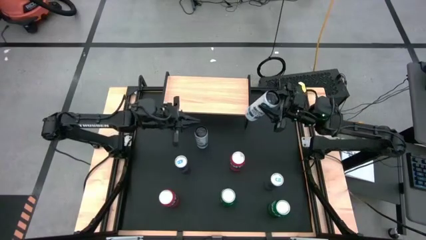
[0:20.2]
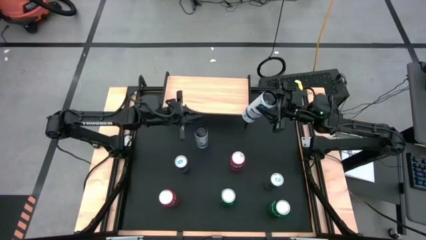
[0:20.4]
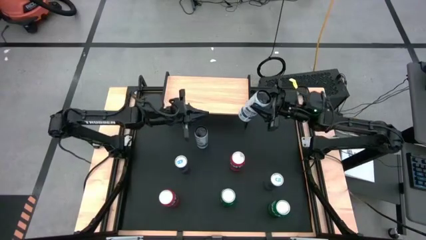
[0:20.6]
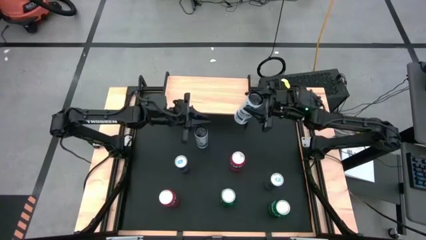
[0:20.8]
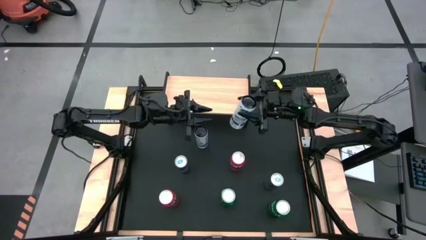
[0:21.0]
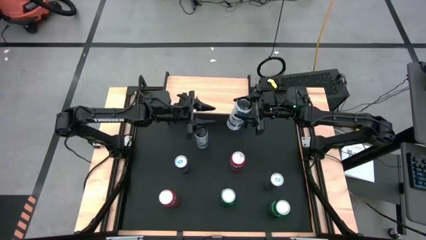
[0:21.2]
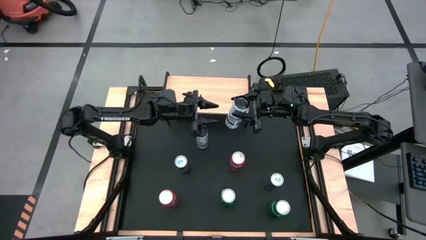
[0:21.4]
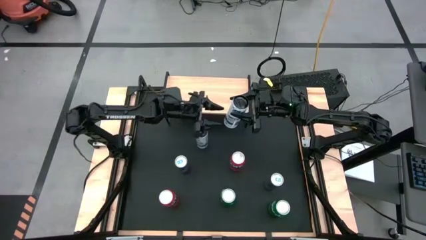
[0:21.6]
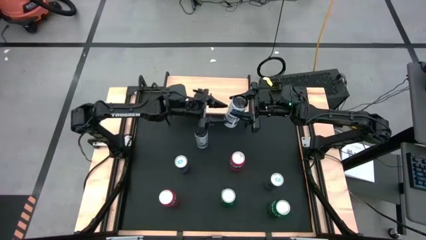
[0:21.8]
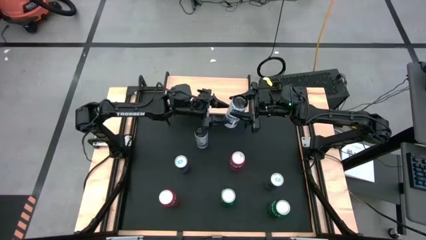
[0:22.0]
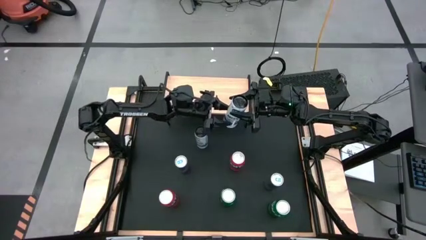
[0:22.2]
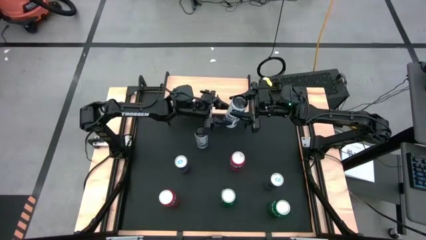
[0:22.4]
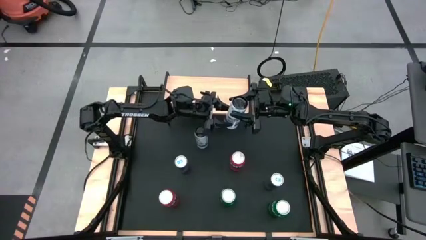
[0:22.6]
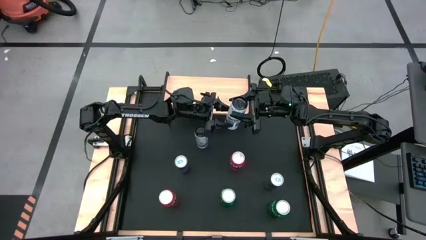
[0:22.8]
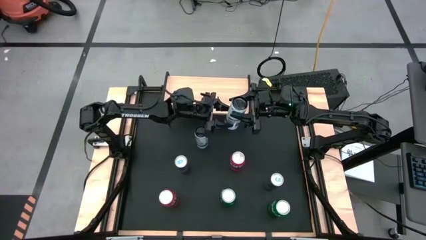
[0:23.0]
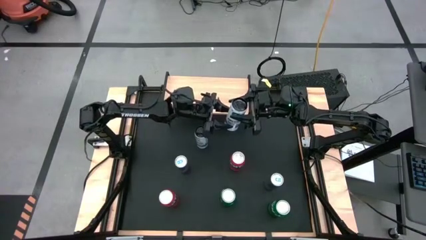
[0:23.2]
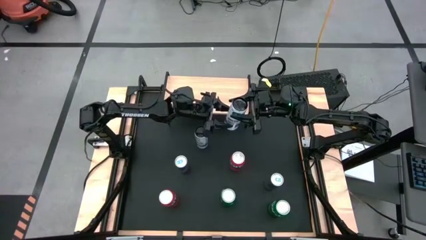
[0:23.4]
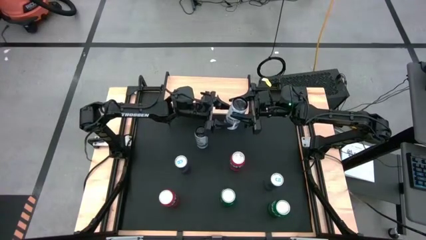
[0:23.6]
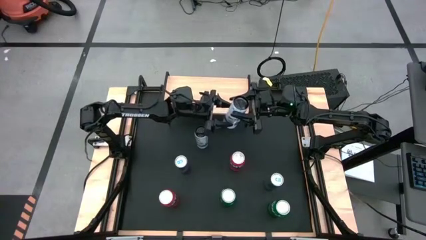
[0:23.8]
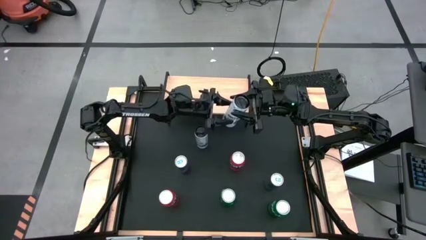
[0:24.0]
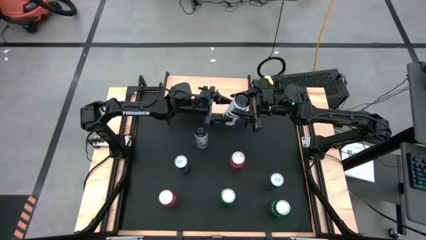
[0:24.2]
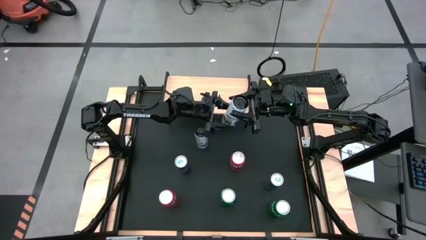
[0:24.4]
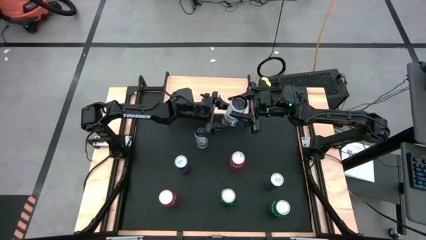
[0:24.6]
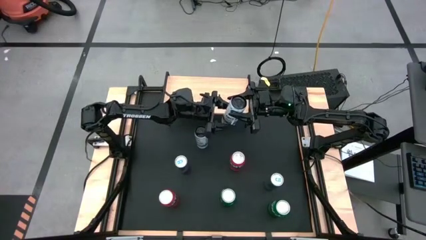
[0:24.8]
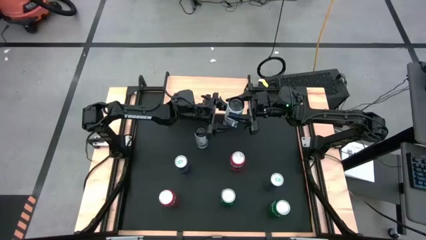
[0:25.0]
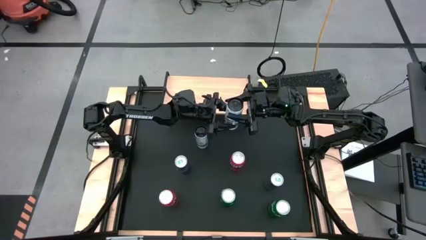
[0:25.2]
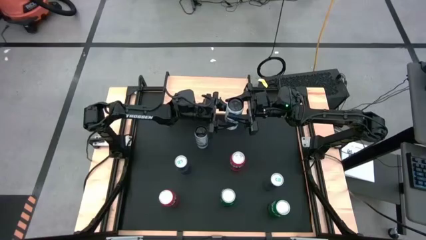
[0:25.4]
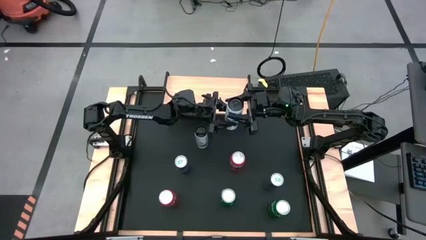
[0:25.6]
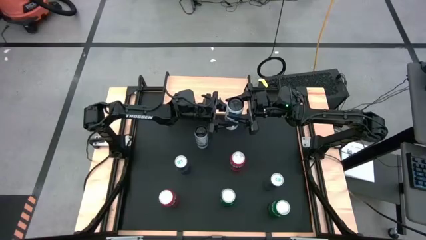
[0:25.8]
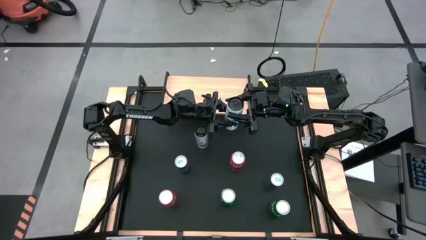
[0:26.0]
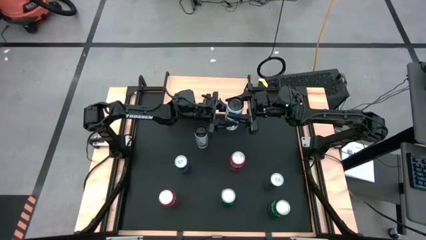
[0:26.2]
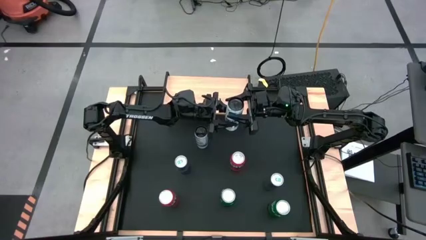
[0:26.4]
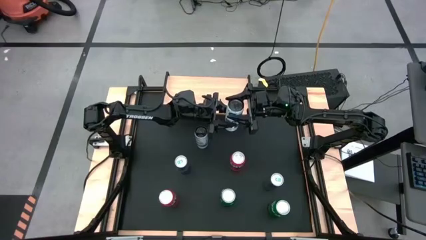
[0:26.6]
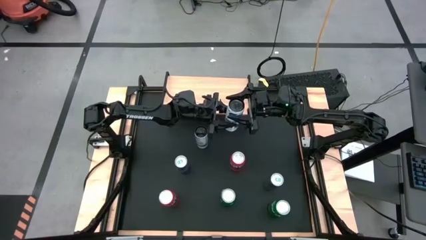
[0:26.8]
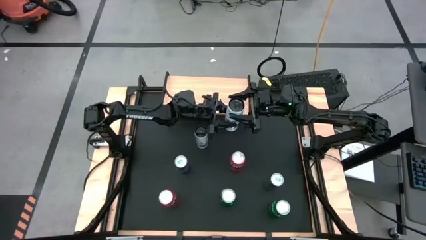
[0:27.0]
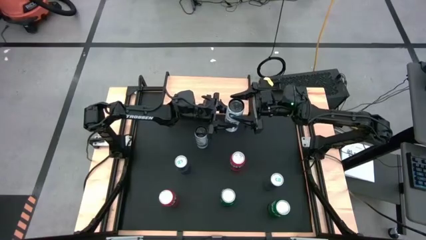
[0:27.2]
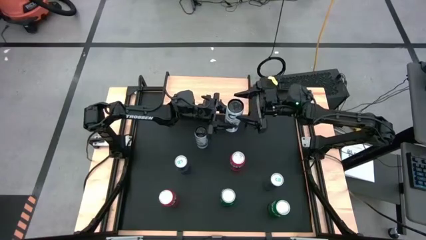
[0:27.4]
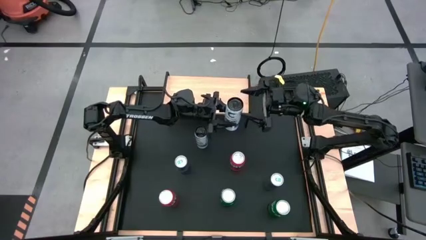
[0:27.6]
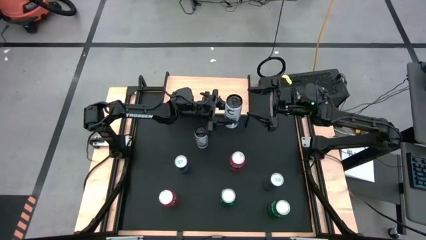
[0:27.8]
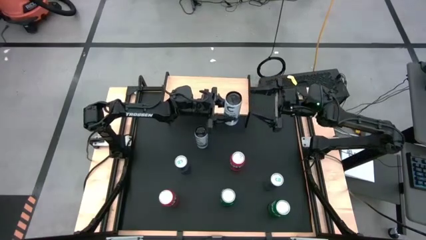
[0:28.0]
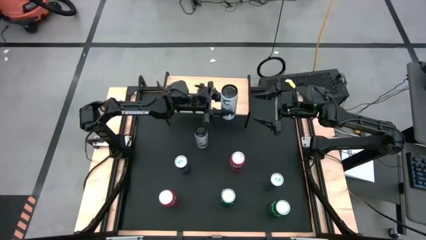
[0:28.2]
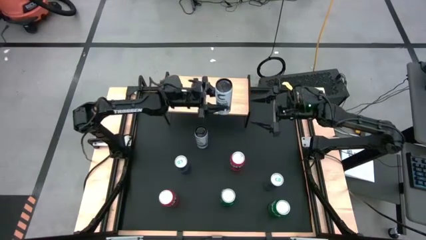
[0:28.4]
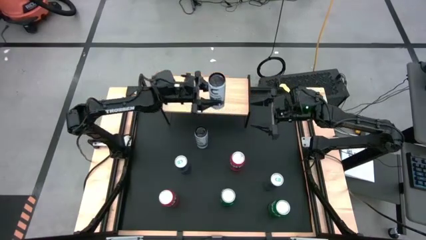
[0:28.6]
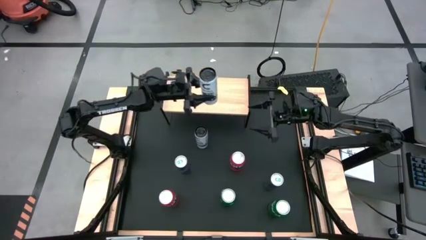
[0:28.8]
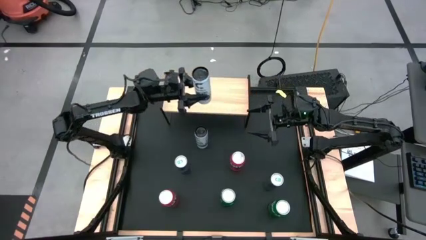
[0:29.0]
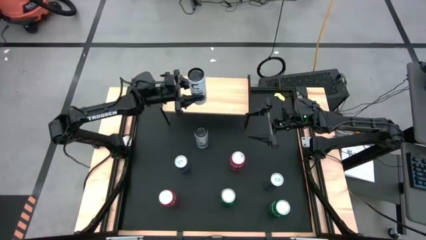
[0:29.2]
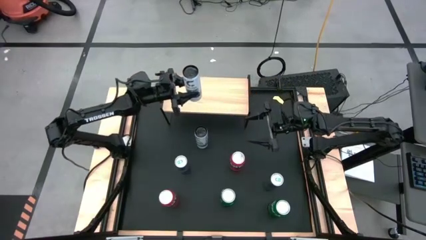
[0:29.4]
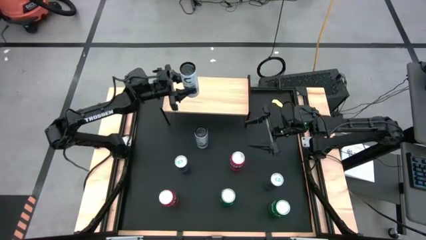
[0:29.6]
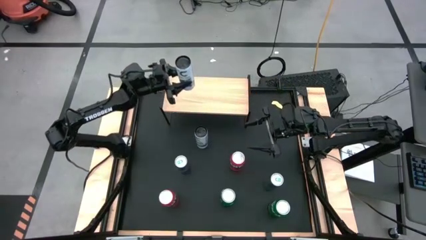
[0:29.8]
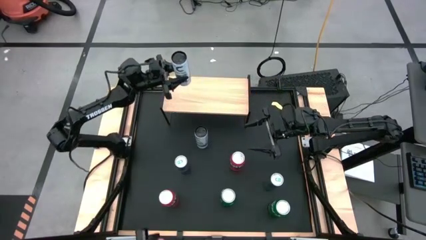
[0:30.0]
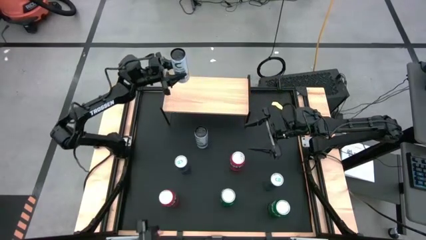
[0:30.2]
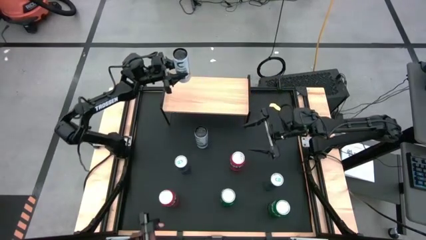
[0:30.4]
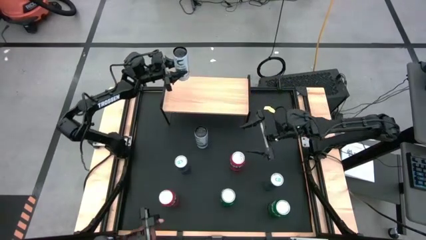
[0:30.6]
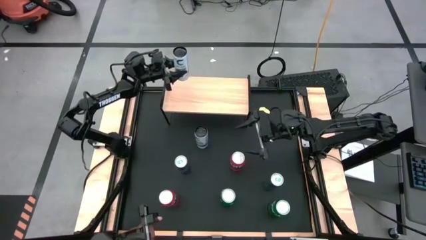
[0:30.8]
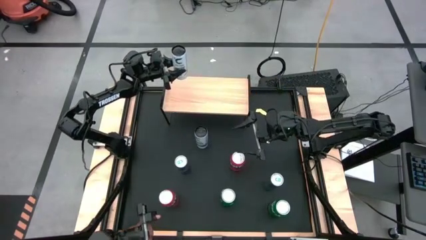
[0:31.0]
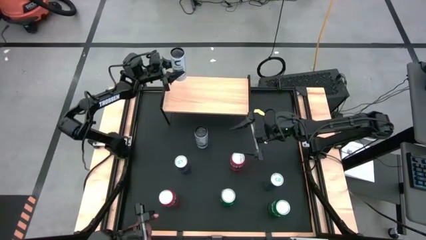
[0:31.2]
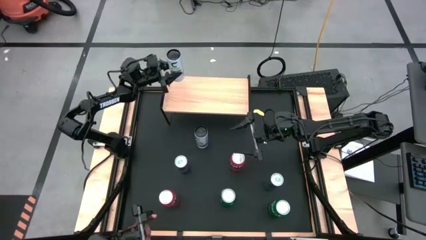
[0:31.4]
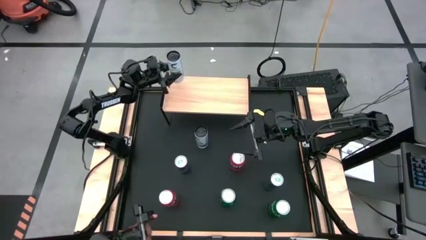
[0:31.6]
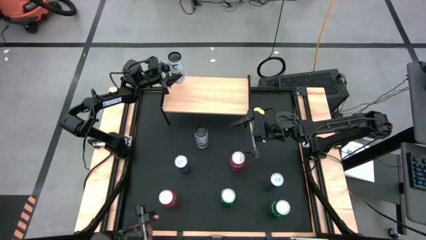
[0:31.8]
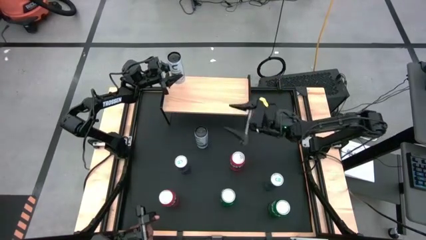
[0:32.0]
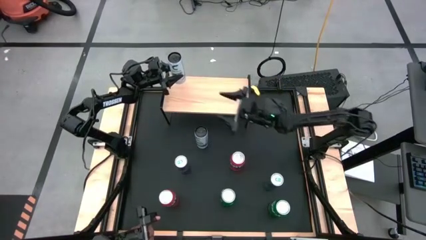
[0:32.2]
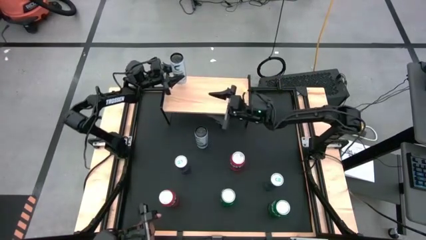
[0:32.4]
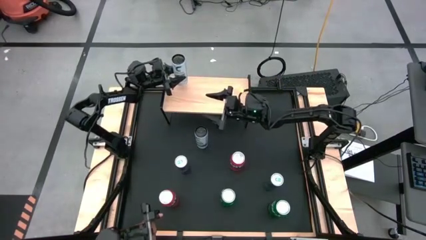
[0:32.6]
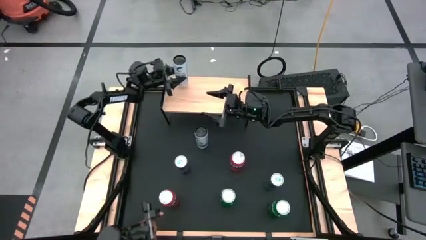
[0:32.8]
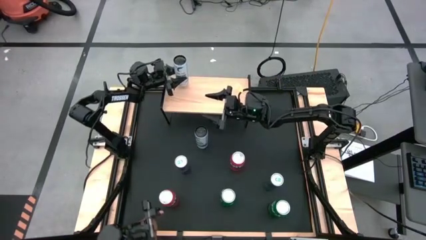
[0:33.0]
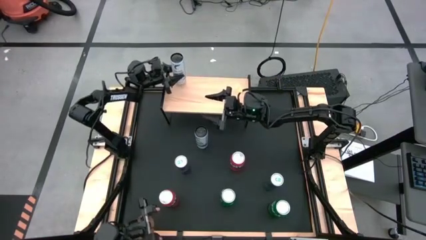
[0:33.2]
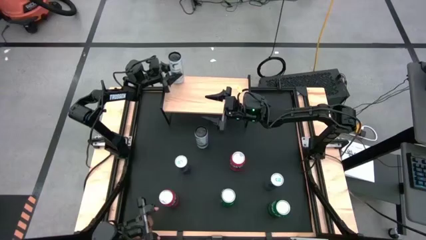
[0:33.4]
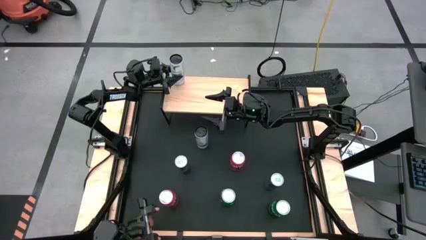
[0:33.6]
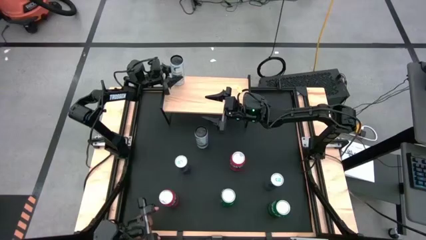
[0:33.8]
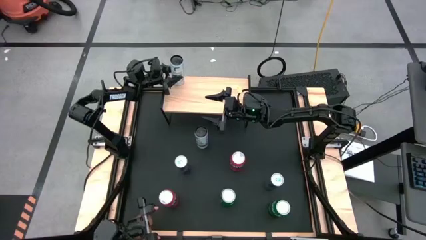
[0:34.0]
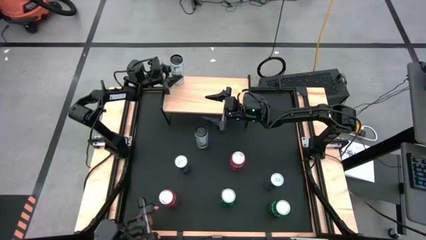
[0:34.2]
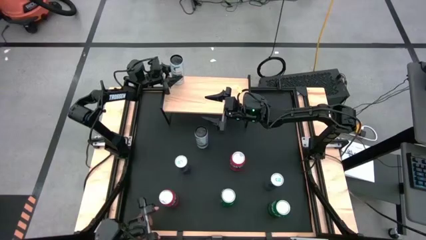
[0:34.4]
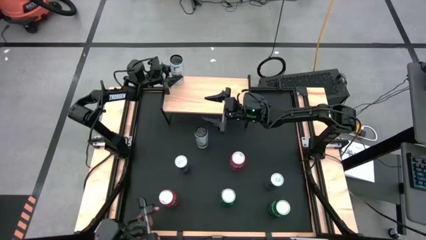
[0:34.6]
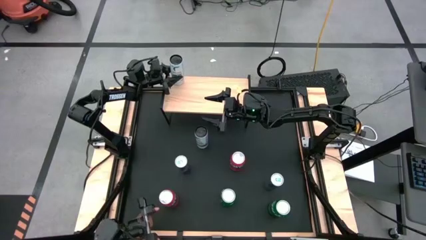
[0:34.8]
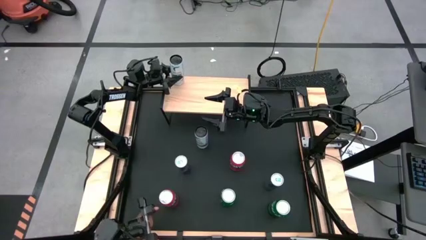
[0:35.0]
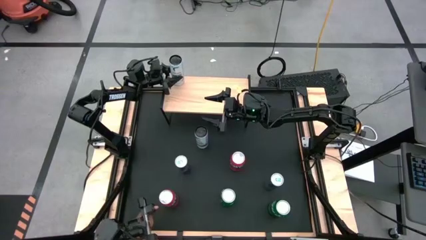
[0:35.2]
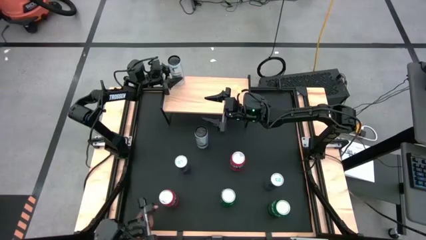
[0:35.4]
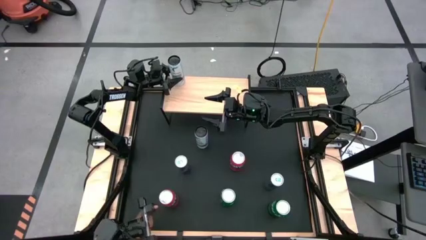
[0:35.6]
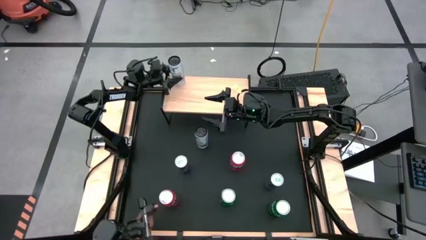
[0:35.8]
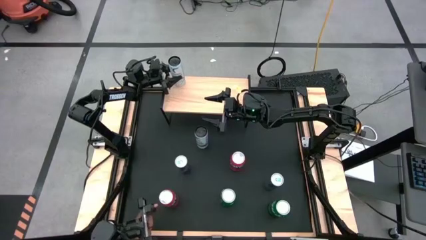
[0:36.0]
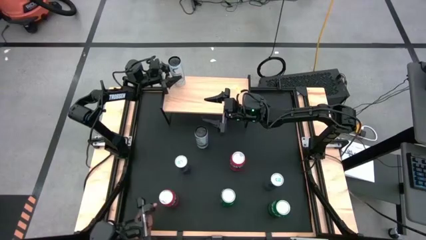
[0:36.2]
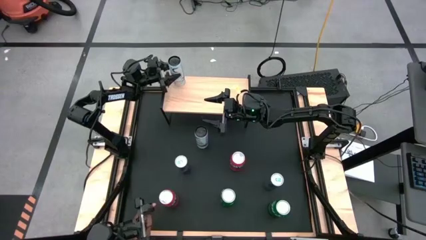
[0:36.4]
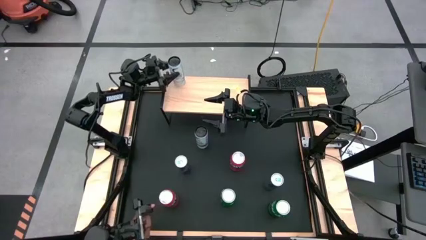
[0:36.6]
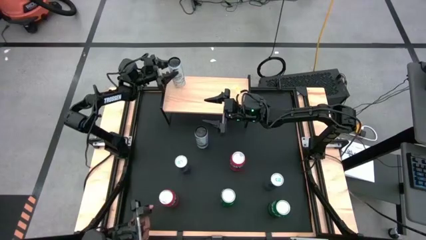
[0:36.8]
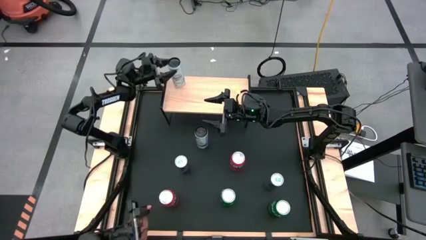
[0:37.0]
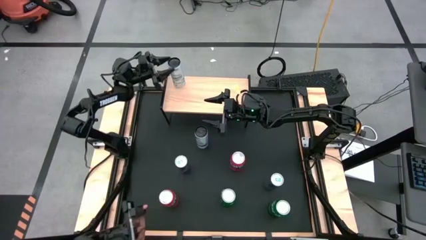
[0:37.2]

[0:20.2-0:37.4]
Task: Place canned beverage on shelf
Put the right white-blue soda can on the shelf
